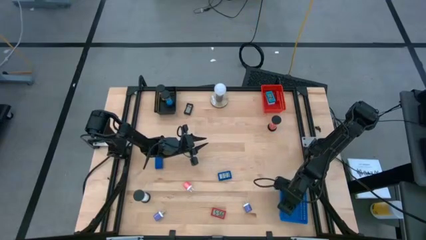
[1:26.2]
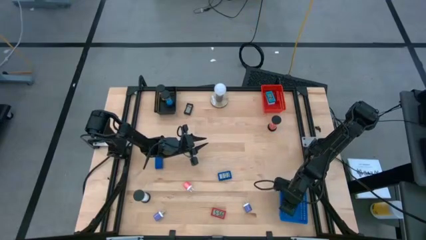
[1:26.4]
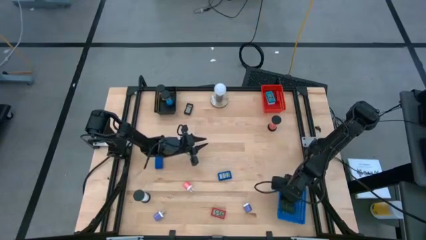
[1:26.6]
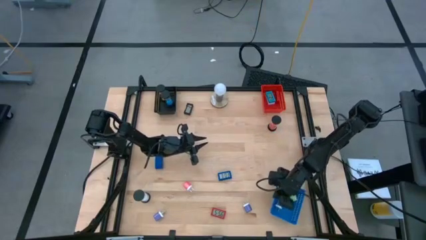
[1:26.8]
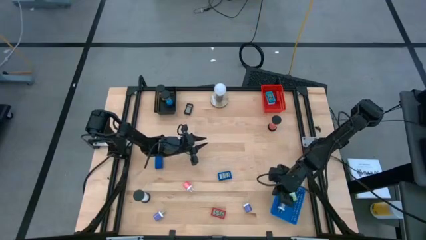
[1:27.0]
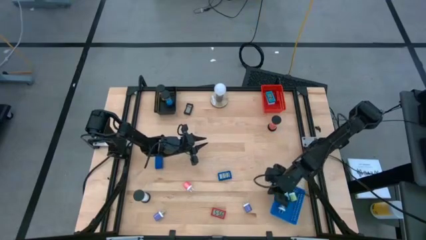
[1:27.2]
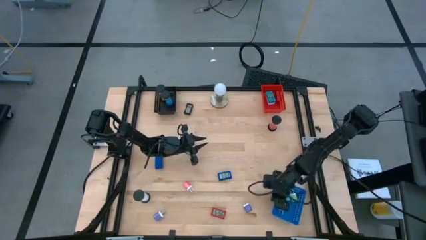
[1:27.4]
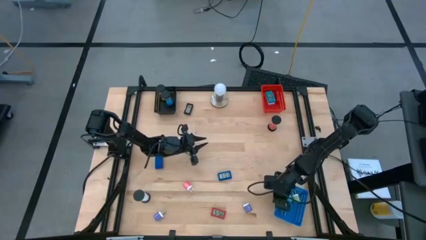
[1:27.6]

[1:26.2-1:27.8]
Task: Pick & Place Office items
Adjust the blue bin

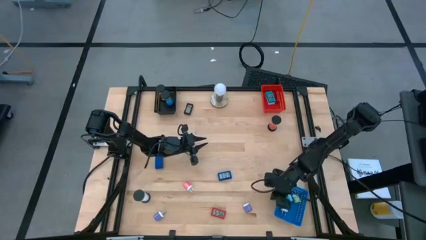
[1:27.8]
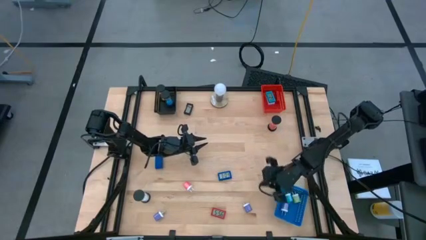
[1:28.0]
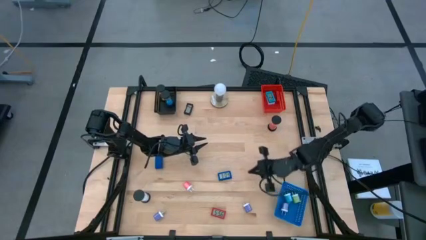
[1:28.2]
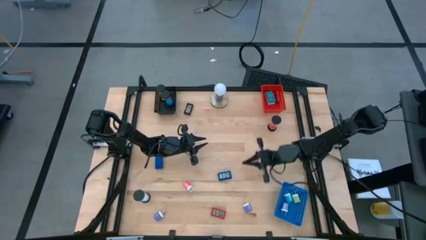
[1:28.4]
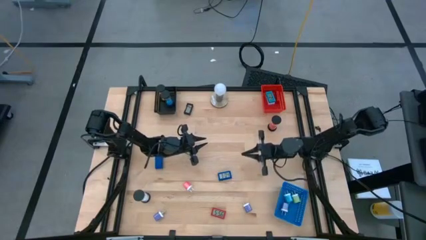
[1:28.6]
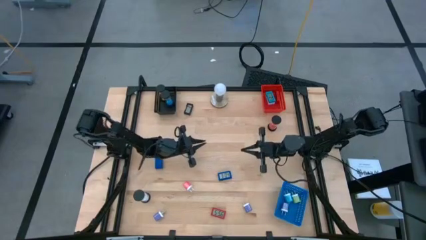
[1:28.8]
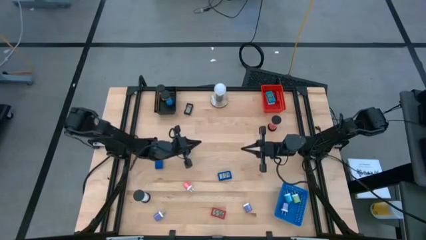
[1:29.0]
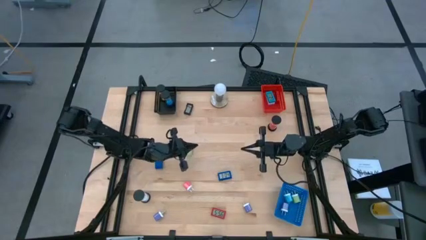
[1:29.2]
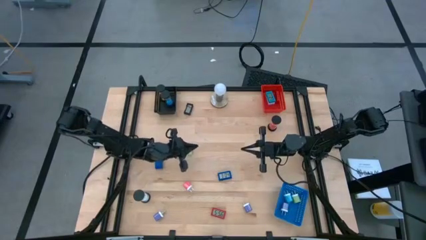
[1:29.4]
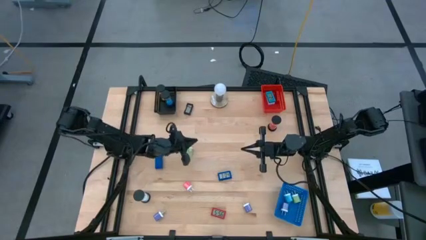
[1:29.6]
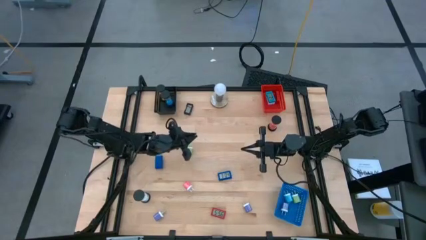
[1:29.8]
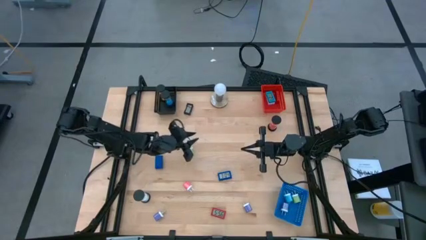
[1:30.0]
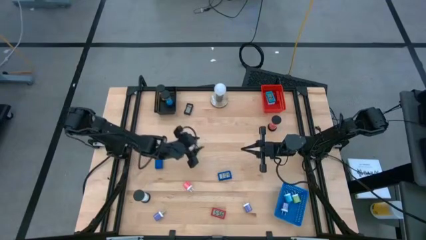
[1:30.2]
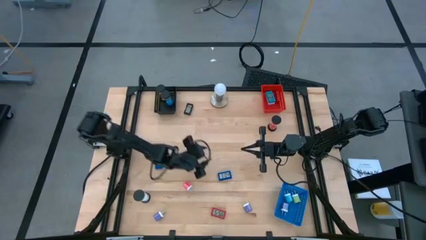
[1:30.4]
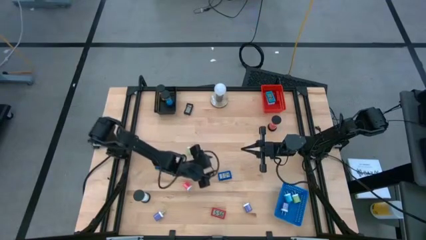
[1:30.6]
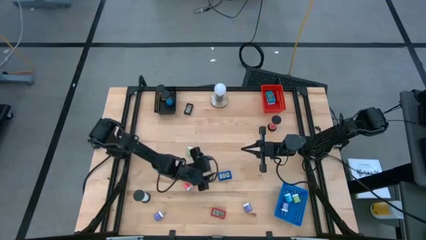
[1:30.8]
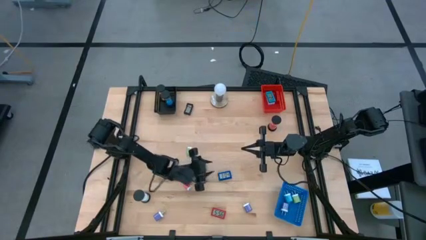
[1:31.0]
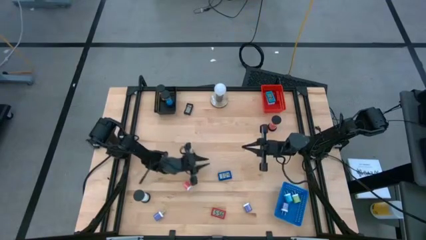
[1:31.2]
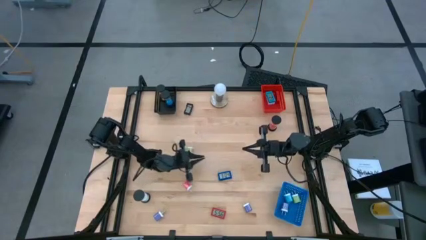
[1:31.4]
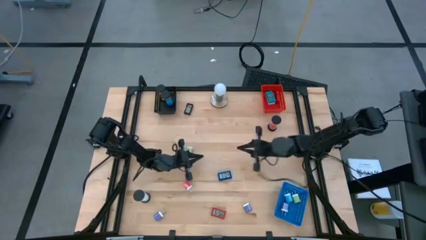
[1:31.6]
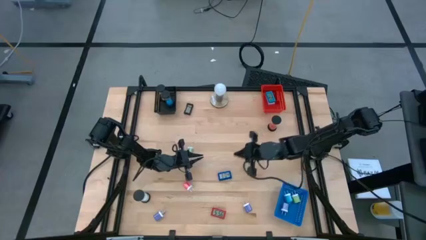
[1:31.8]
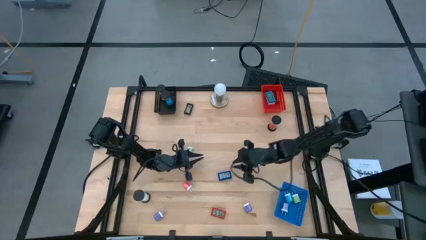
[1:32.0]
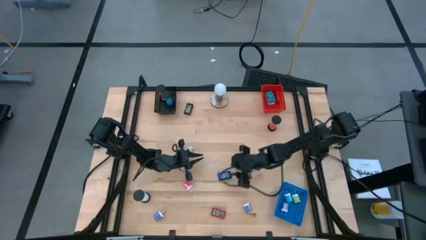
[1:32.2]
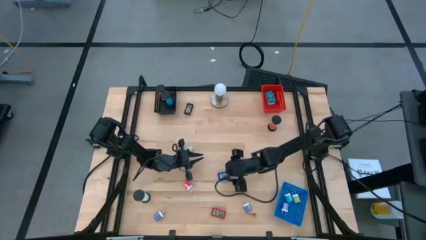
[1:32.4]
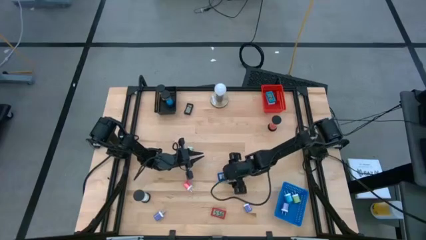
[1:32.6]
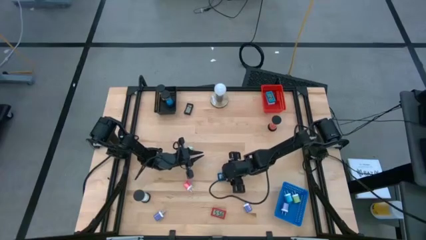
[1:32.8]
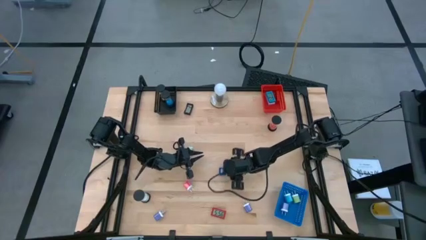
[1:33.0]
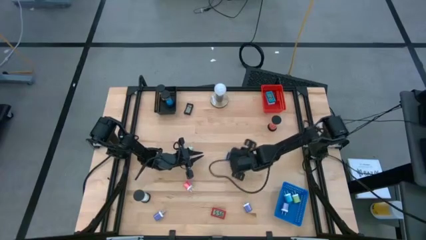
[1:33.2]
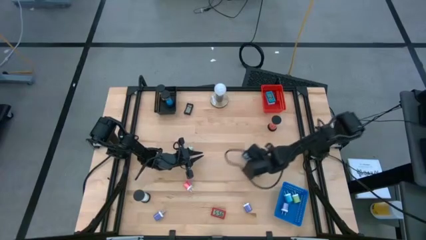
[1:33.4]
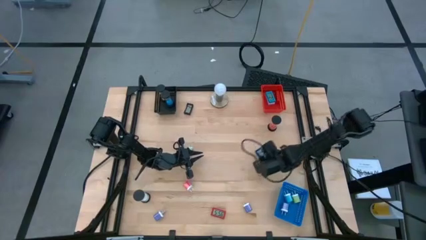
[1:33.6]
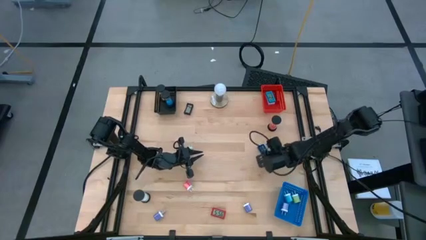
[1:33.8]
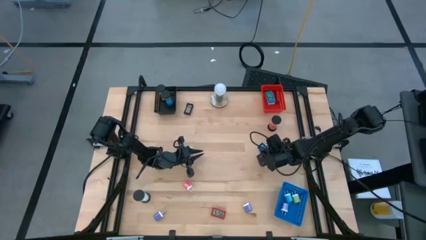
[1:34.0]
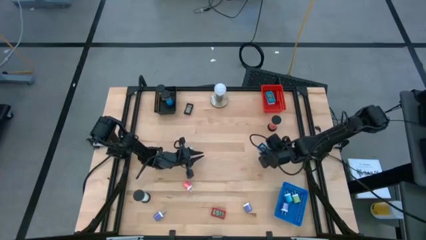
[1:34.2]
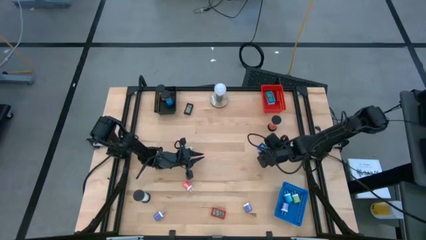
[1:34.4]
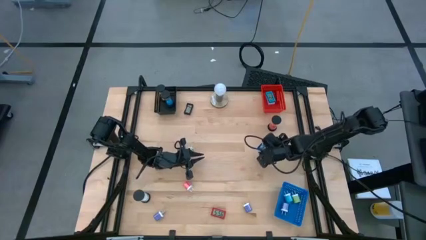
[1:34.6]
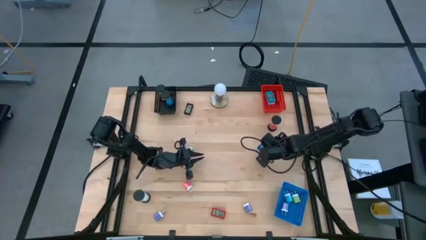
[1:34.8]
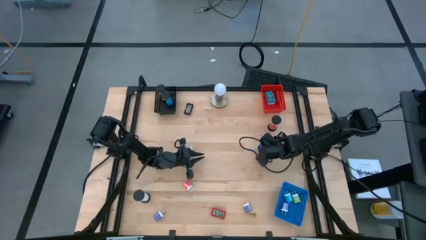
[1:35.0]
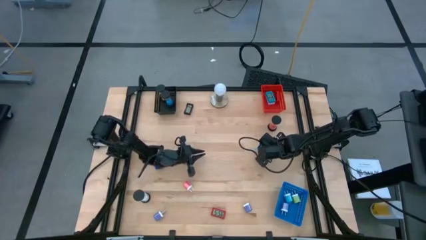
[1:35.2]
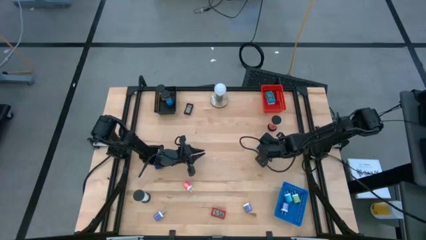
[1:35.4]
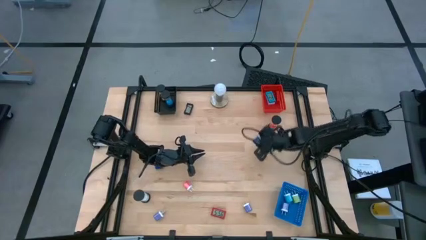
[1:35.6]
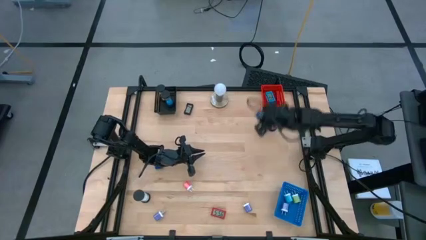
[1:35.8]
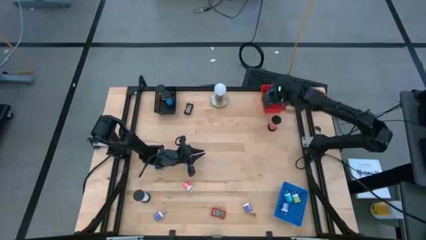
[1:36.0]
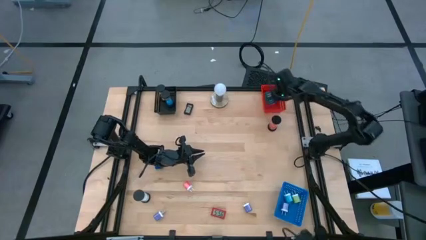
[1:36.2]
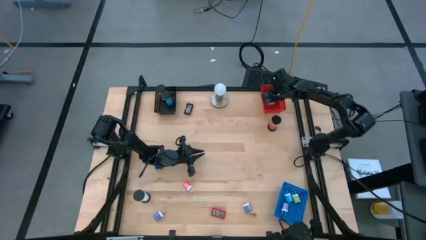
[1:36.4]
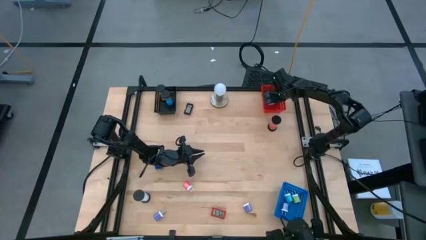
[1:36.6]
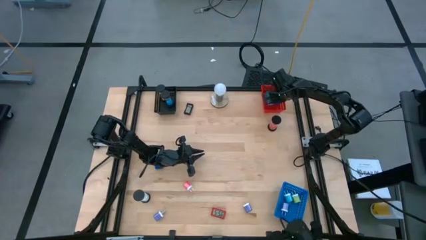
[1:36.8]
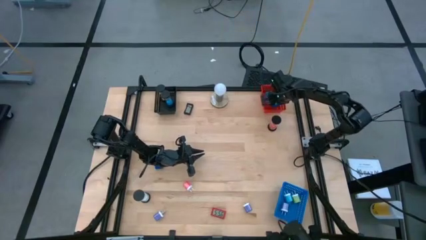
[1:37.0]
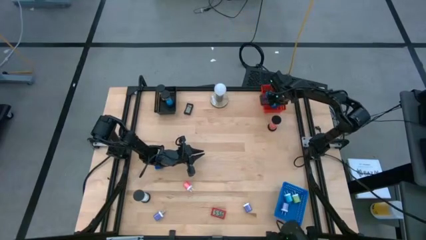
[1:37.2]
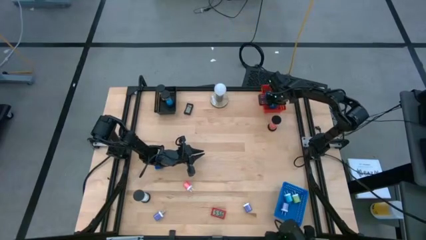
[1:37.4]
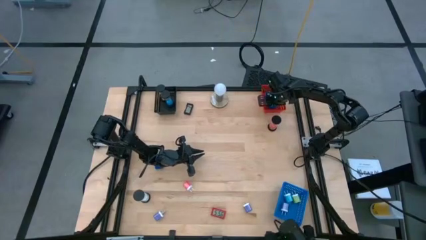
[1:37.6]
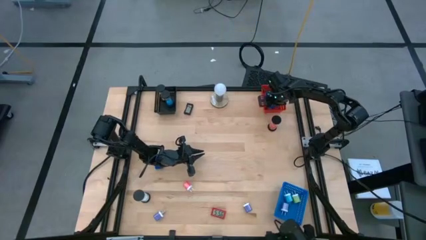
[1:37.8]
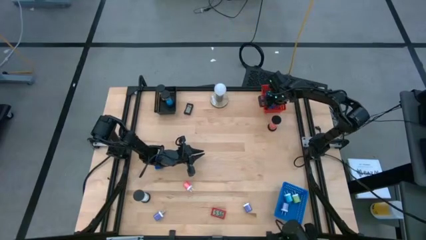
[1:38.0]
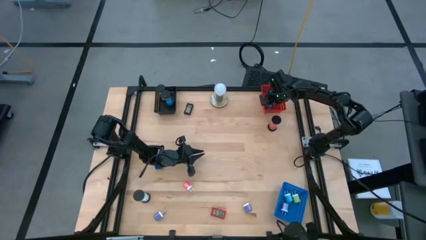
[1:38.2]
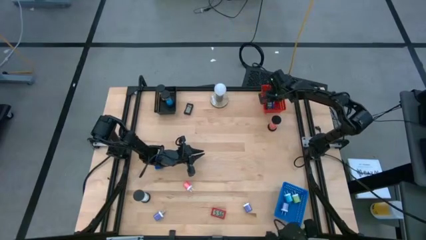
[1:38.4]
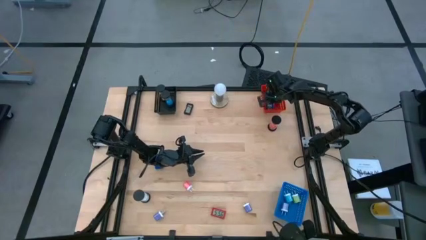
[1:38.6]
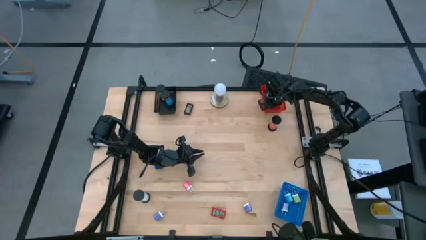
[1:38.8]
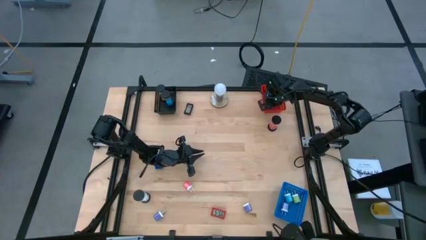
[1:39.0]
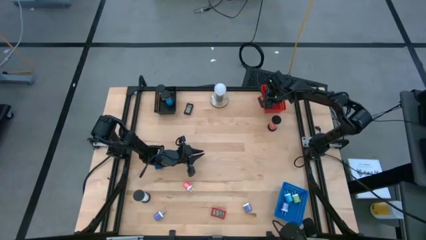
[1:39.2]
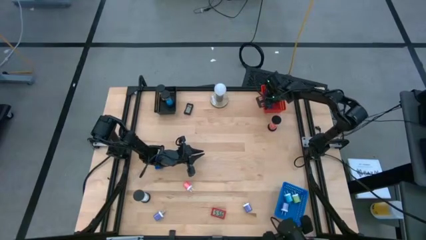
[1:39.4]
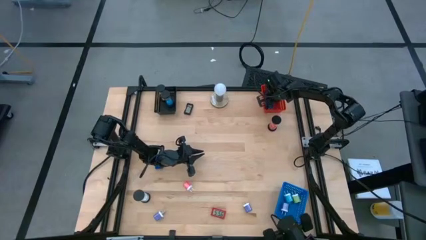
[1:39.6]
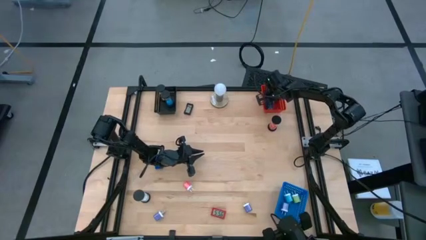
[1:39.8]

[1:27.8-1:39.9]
Put the right blue digital clock into the red bin
